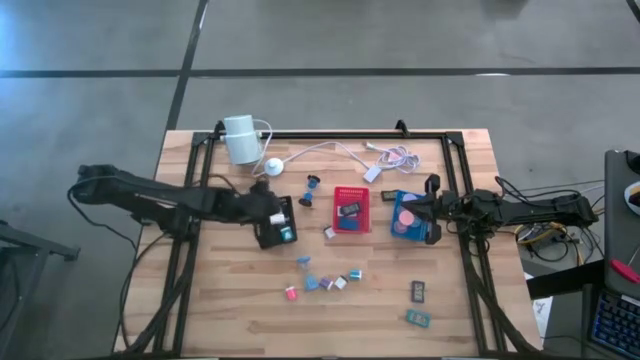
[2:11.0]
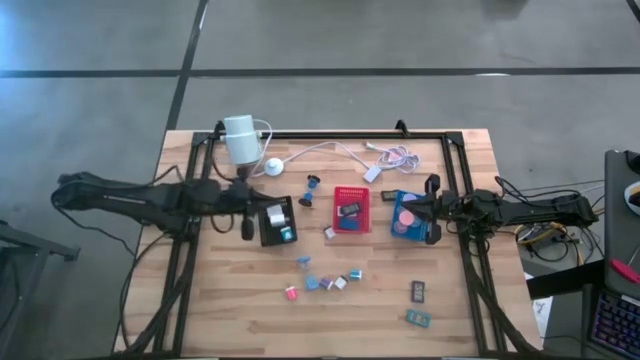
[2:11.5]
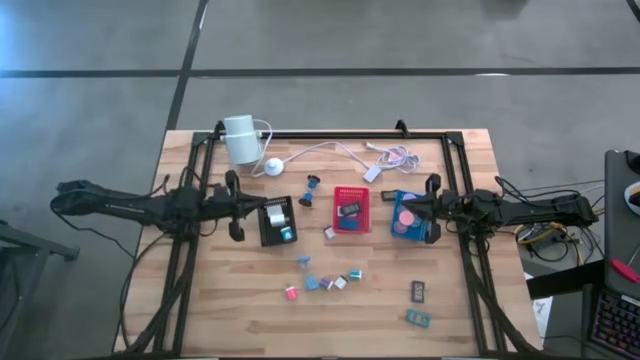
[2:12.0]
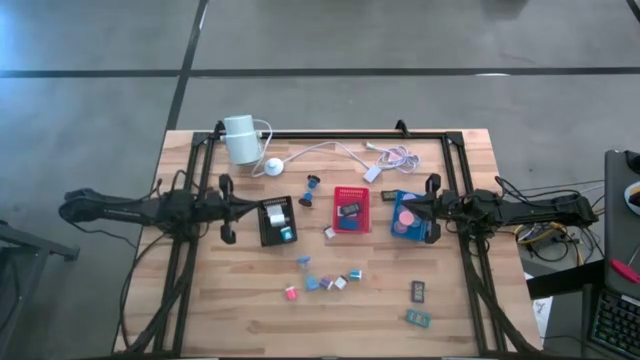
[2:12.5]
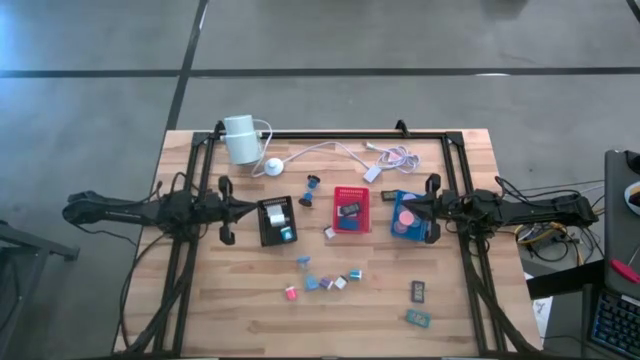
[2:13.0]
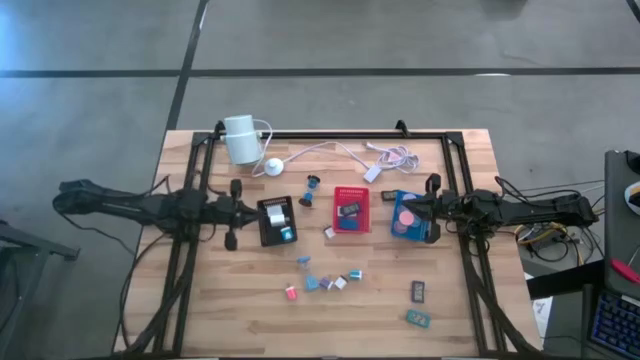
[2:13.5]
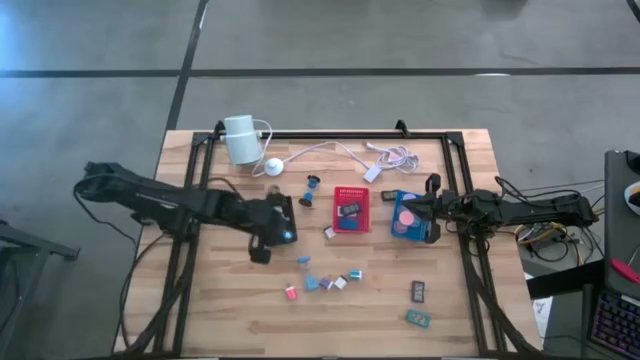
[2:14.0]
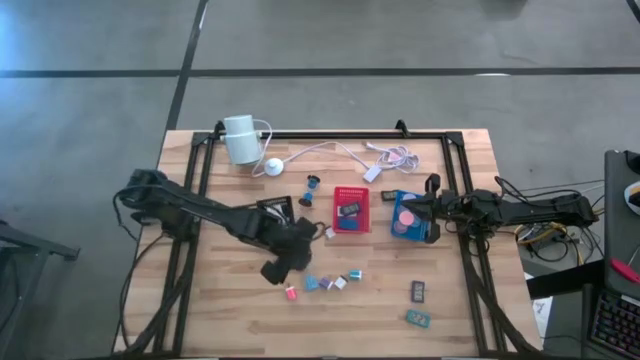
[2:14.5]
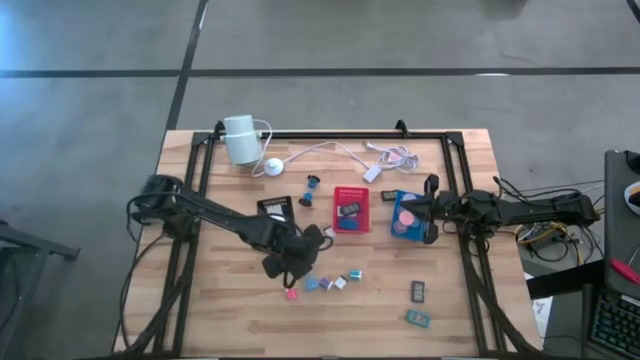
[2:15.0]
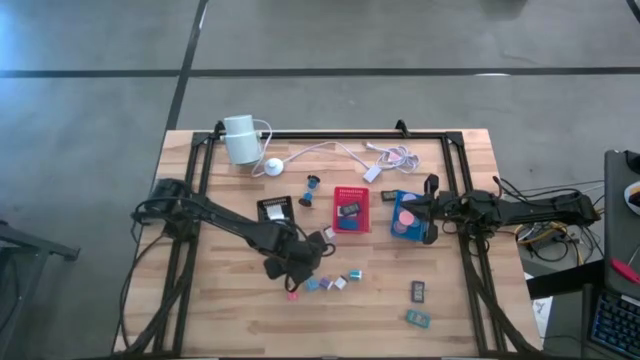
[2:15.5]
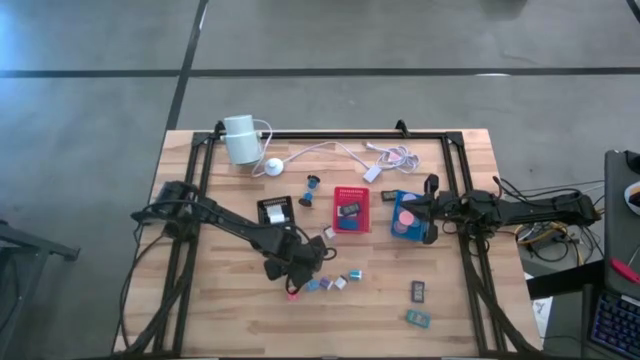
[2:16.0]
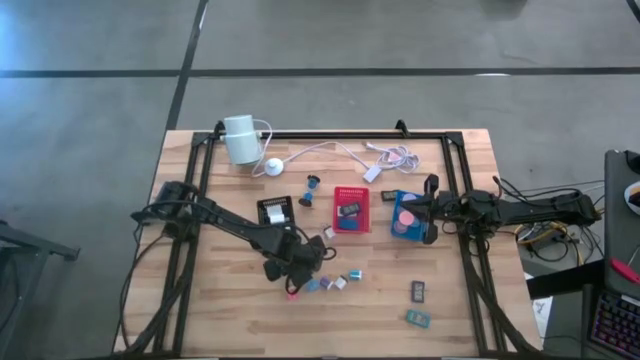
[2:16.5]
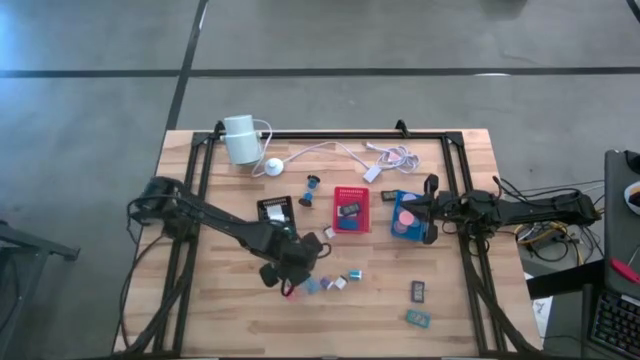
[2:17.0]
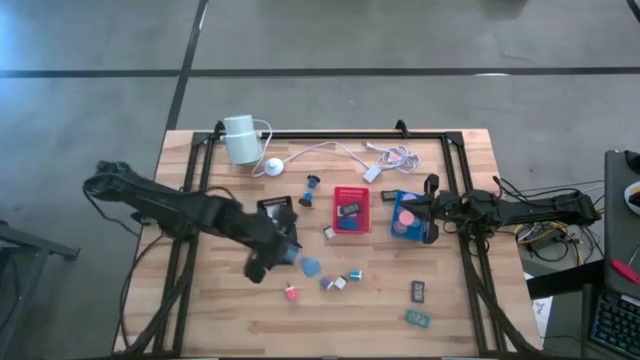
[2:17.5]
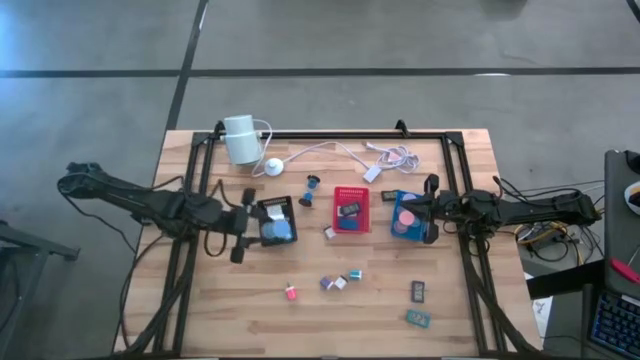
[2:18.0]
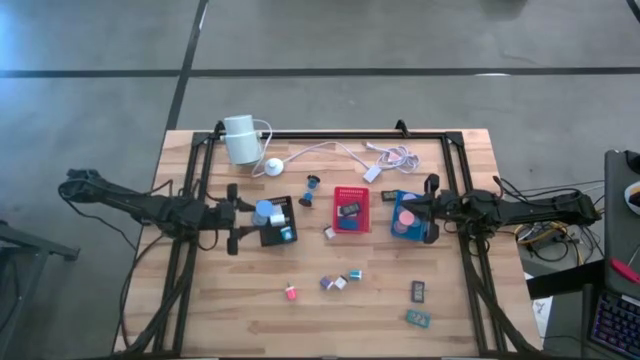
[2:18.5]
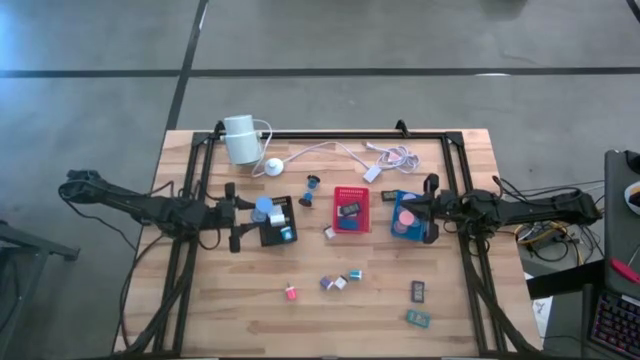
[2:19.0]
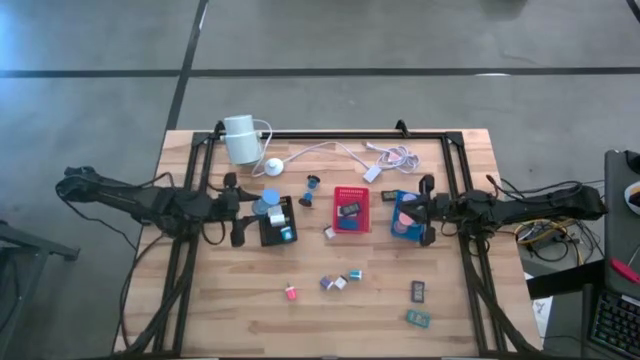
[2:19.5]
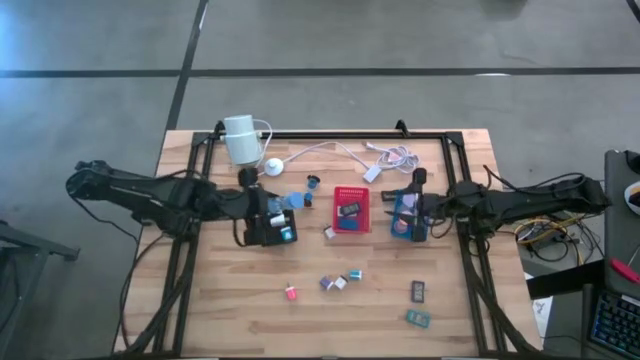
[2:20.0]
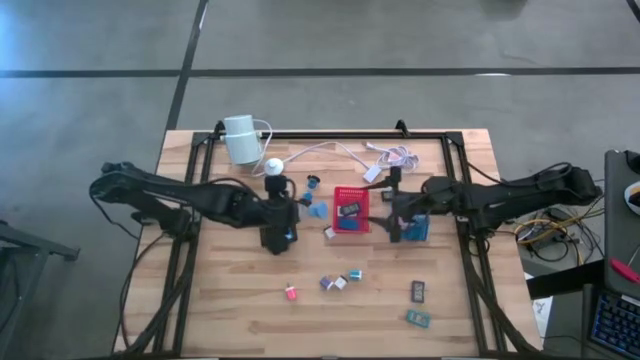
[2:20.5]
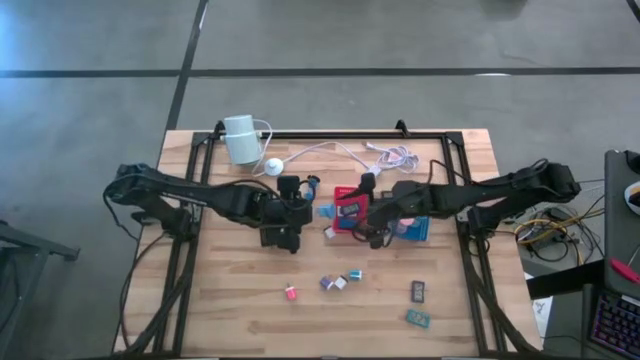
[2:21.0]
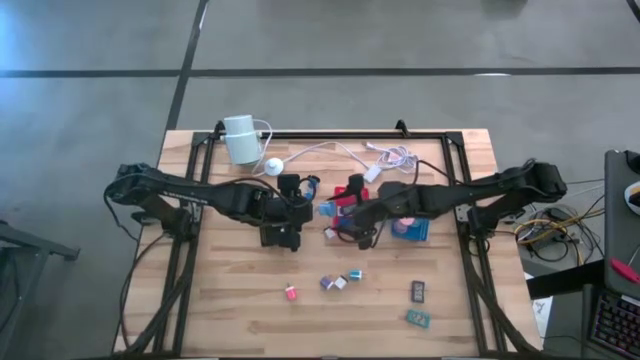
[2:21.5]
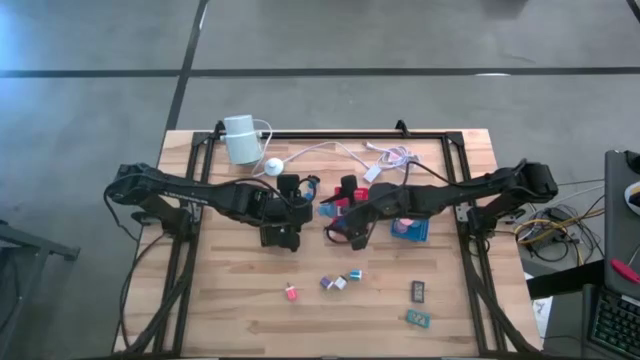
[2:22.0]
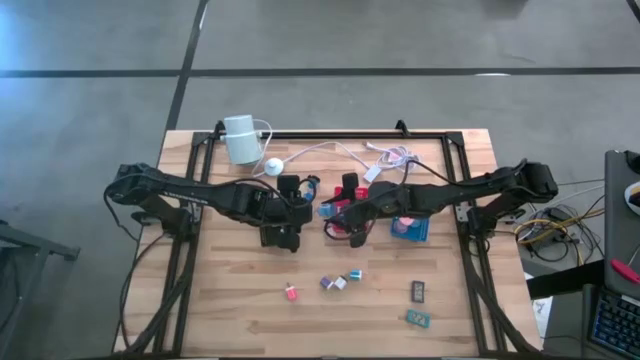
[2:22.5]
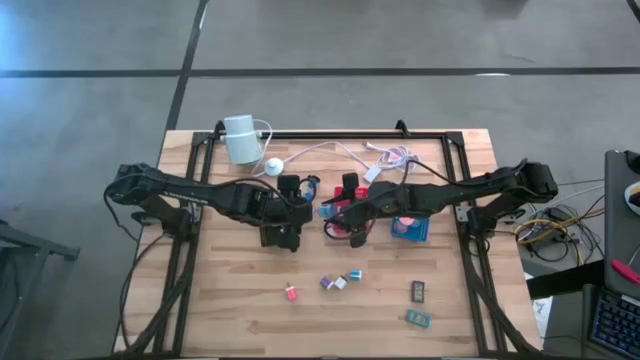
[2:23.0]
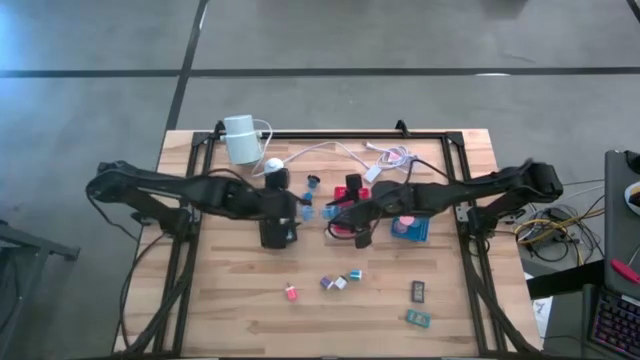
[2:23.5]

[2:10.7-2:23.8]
Task: Pick & Place Office items
Put the light blue hourglass into the blue bin

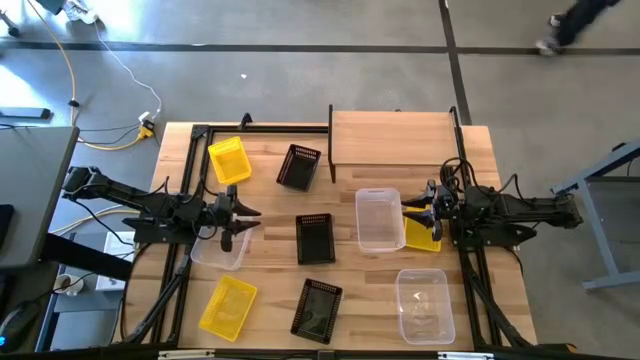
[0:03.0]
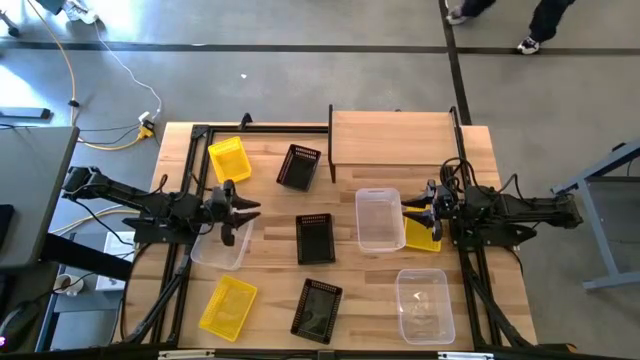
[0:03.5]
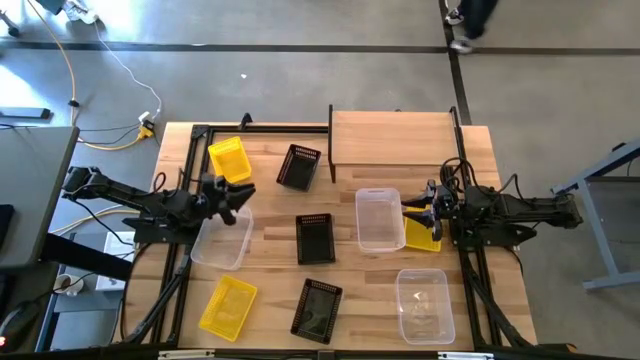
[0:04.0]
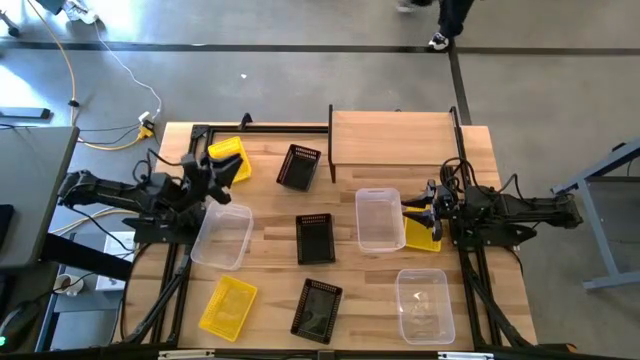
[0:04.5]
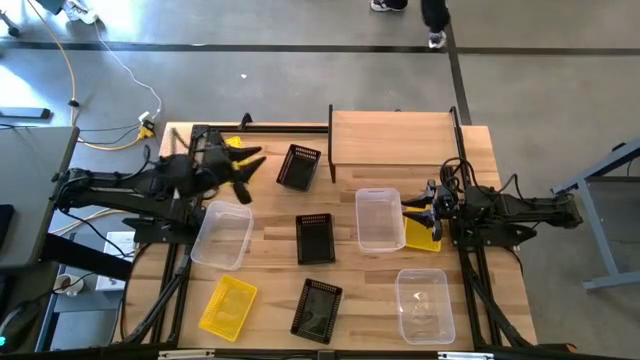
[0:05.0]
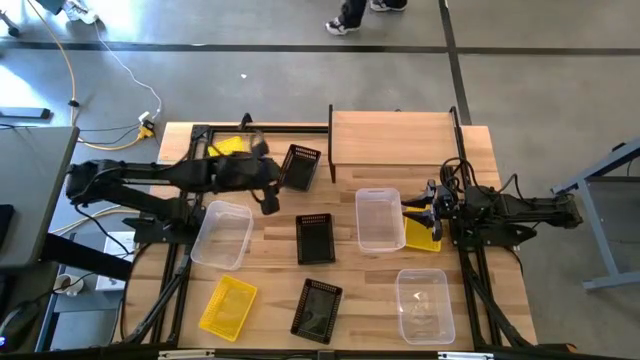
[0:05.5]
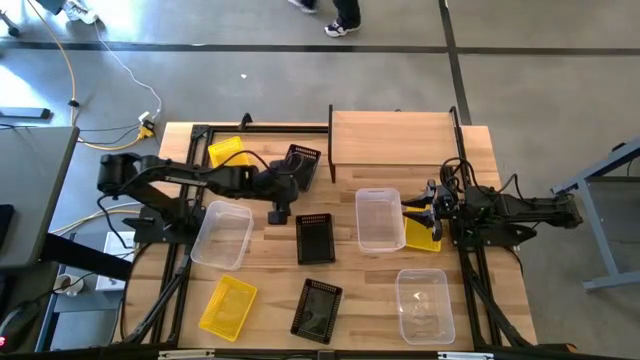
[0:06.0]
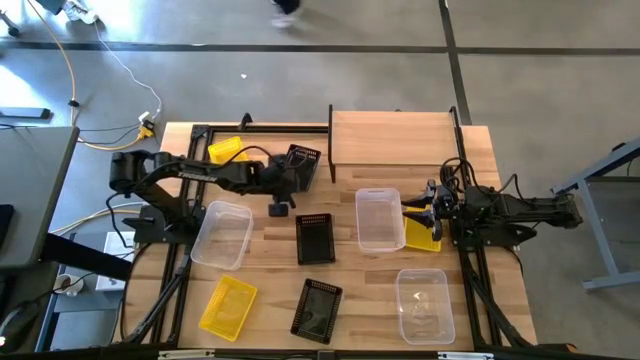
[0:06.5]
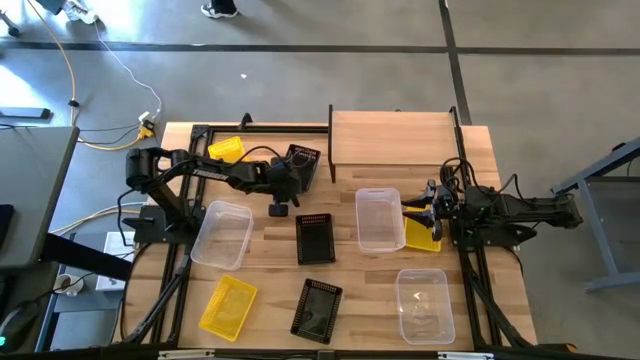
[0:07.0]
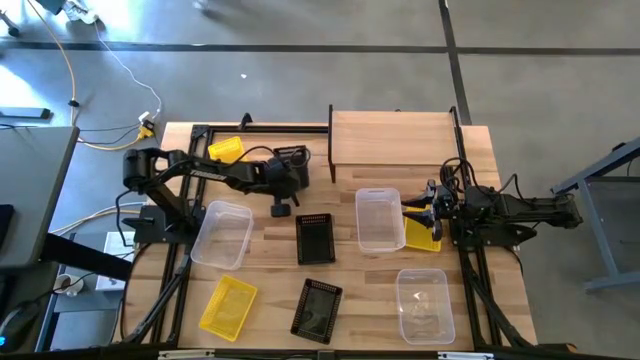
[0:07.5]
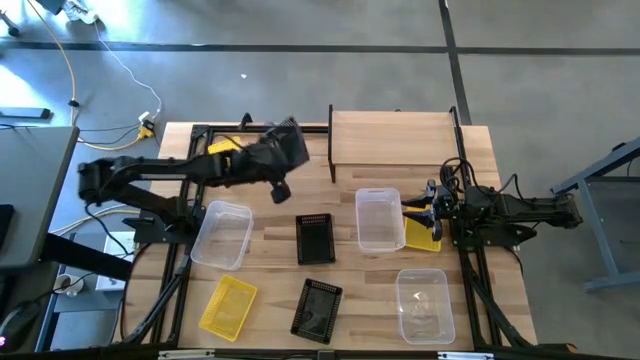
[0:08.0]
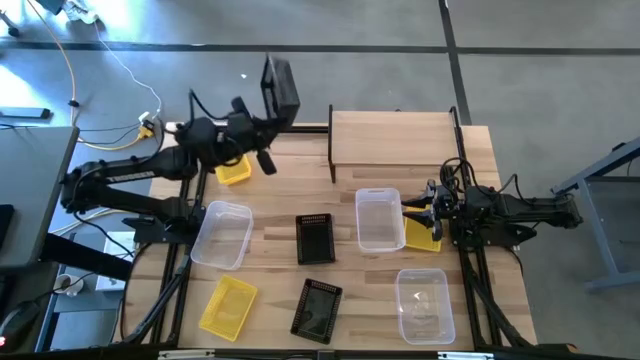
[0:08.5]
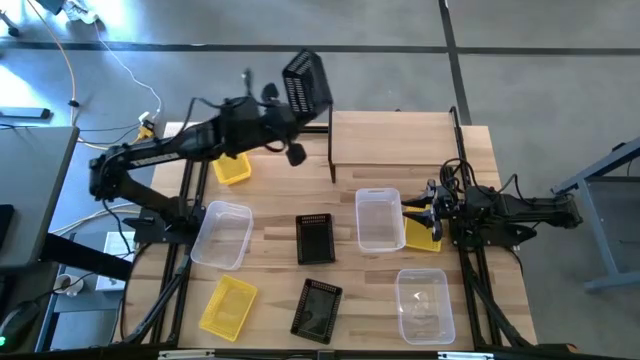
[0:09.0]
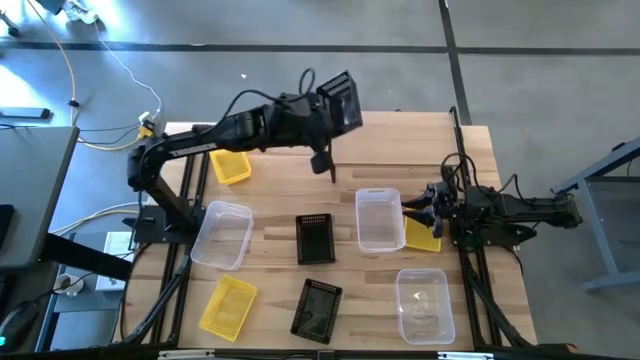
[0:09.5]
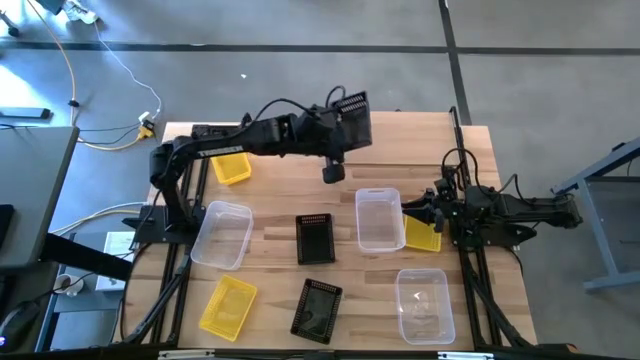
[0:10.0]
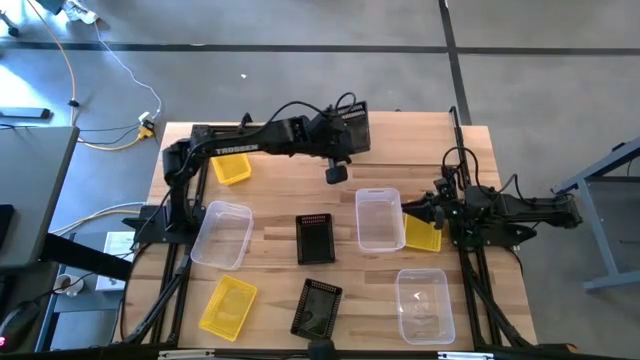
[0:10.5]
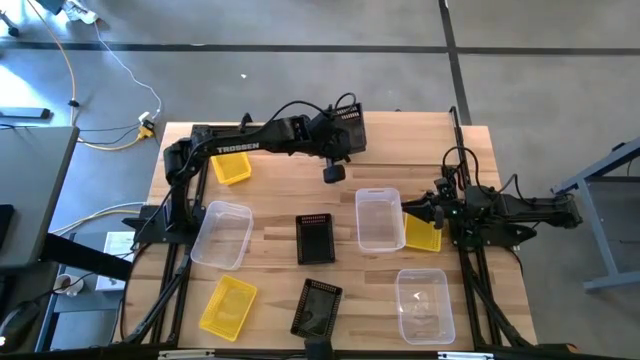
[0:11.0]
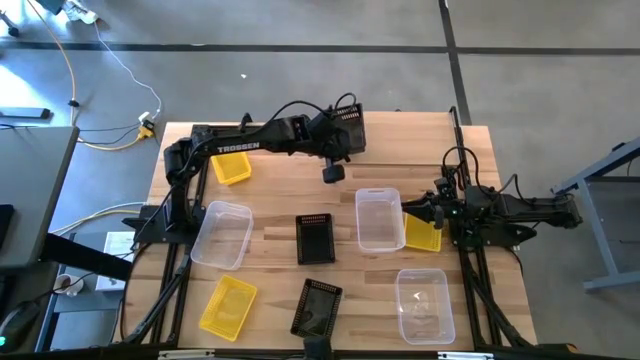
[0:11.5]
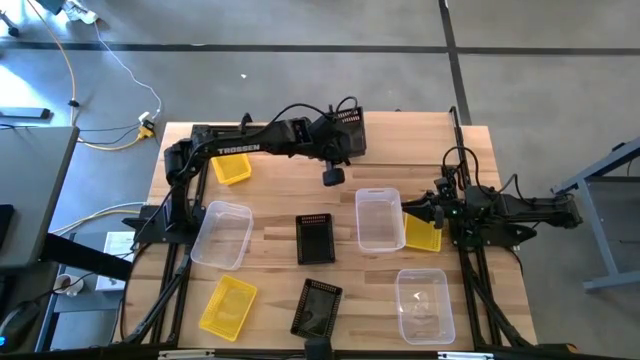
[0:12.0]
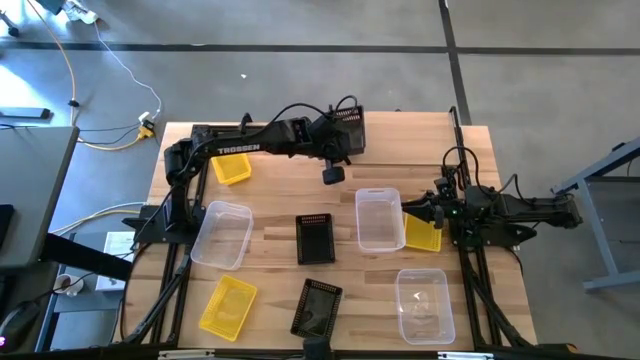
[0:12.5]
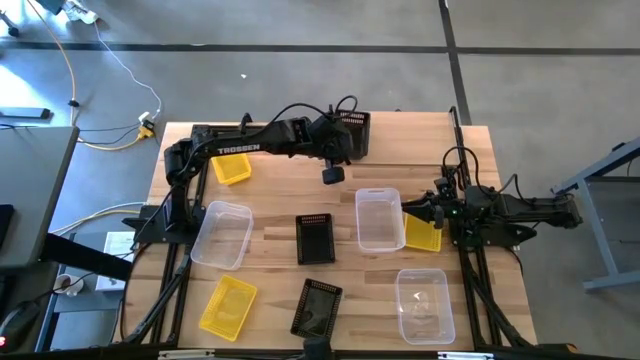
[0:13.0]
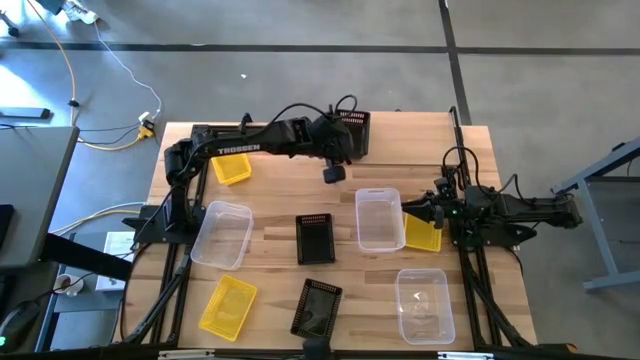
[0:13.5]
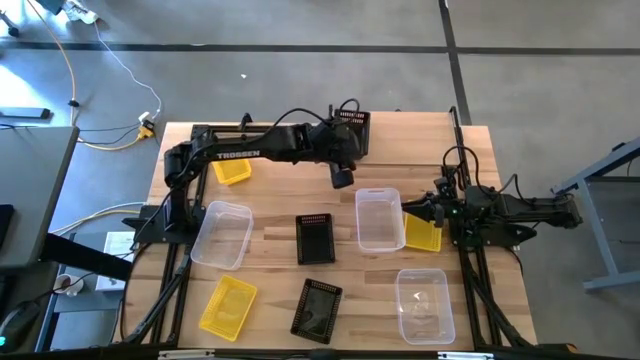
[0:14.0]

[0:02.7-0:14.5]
Task: Stack baskets on shelf by color
Put the top black bin on the shelf
